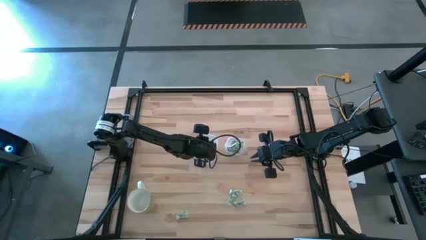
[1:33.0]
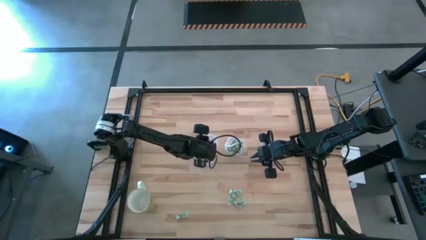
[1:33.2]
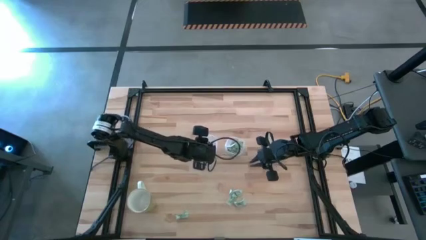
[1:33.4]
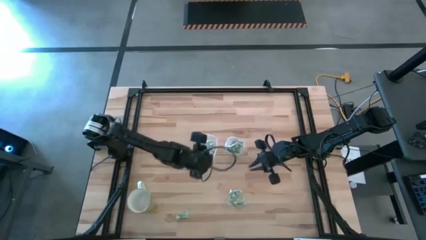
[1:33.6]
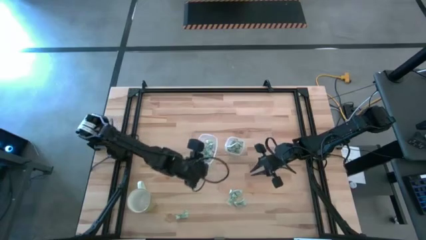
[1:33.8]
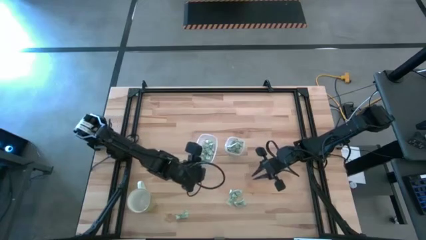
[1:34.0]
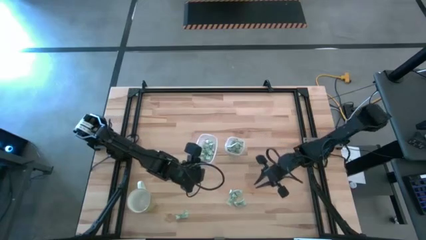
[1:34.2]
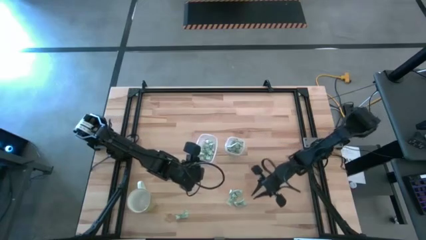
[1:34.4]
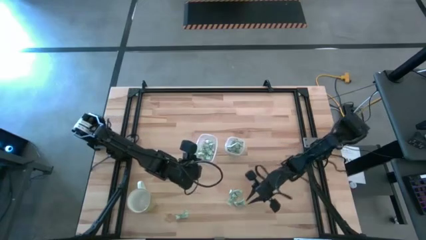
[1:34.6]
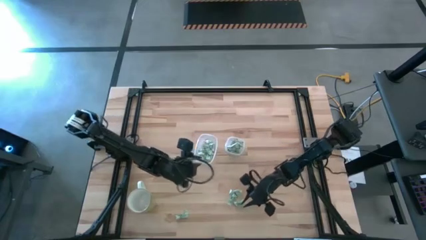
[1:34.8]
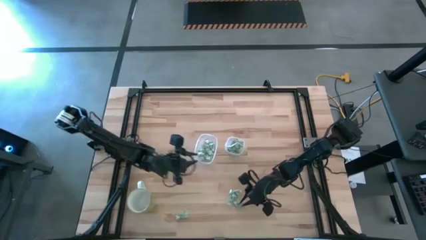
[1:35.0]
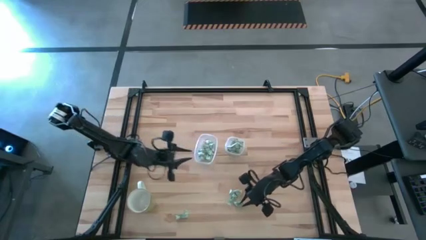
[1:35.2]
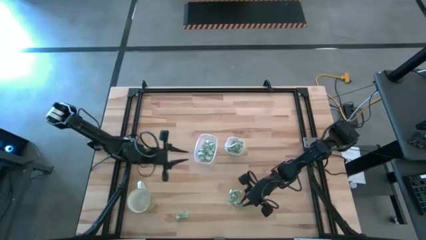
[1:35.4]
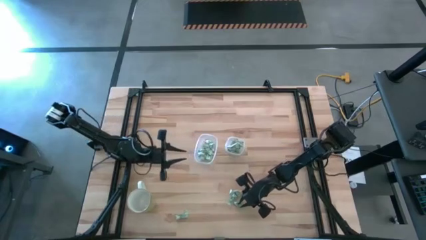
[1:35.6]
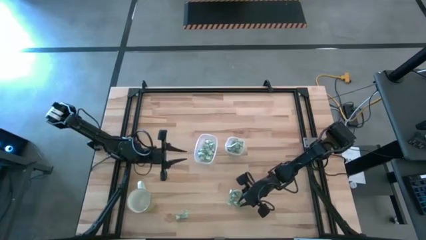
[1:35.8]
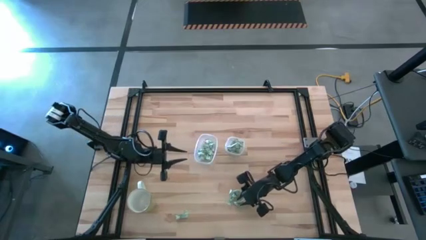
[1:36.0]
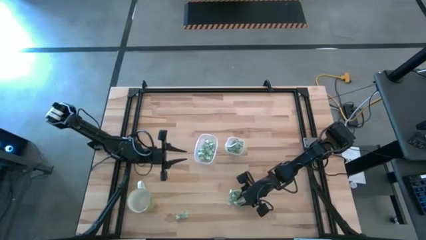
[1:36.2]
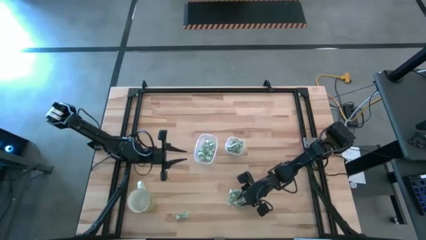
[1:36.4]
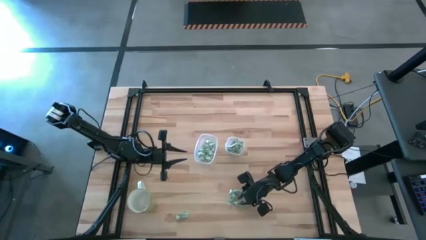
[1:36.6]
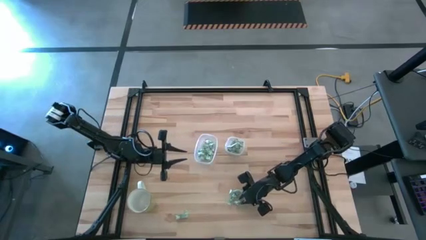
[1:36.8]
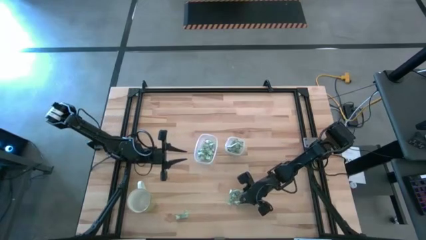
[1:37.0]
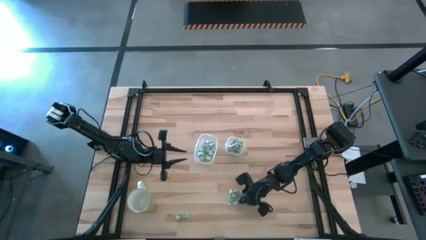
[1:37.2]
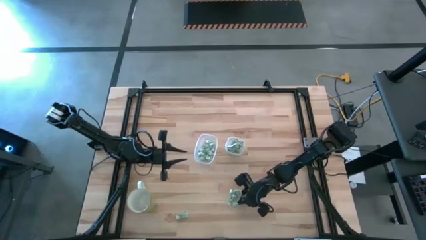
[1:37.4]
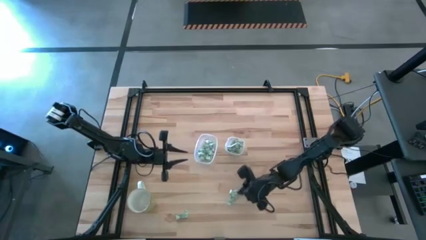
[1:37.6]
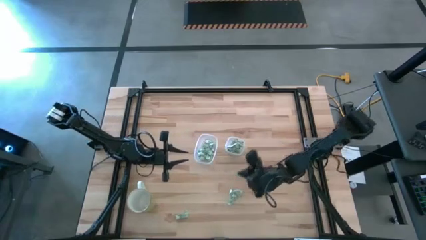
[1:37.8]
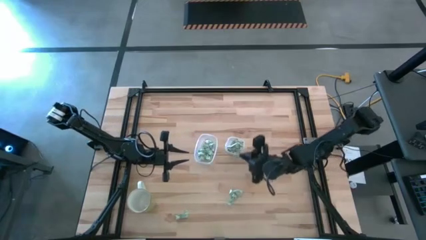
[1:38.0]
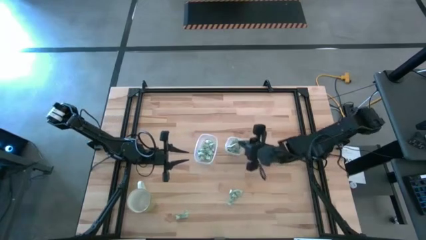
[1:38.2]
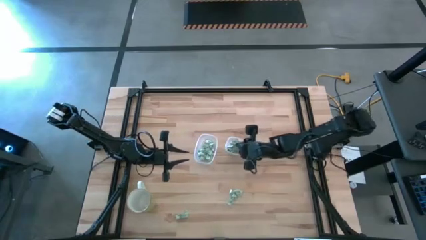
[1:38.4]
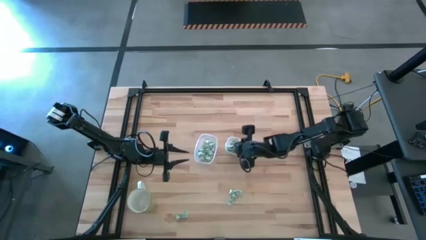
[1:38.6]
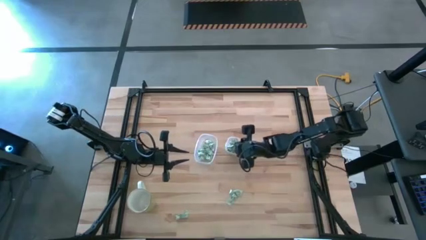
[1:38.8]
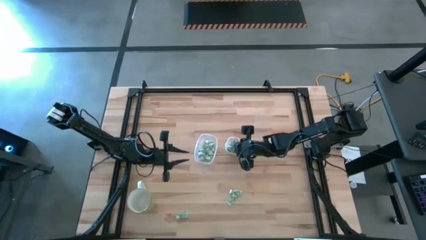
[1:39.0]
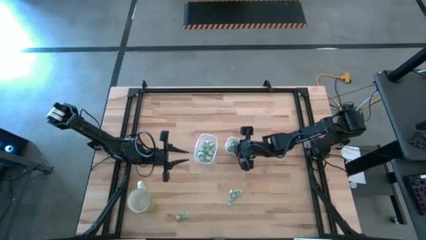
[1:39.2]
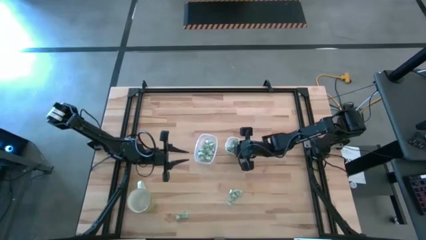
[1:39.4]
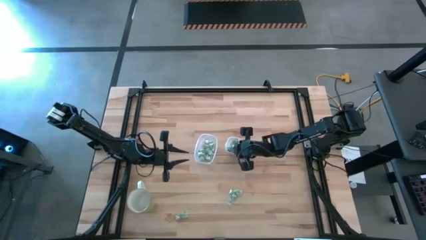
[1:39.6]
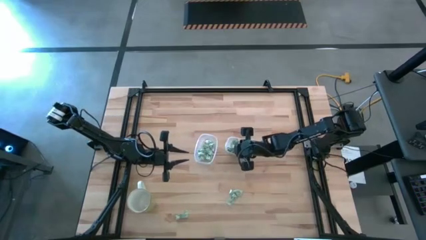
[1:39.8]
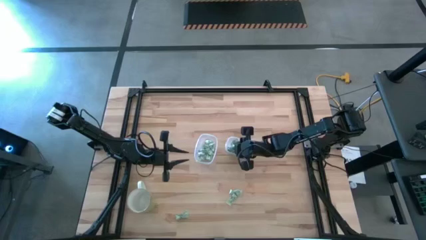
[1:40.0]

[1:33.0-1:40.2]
Task: Pick and place items into bin
Put the white stevia packet into the right transparent bin

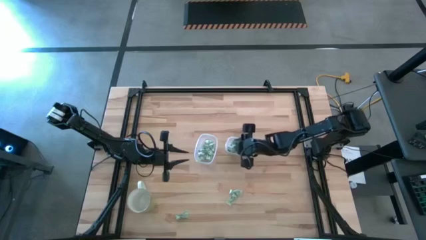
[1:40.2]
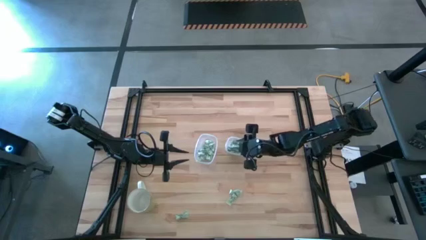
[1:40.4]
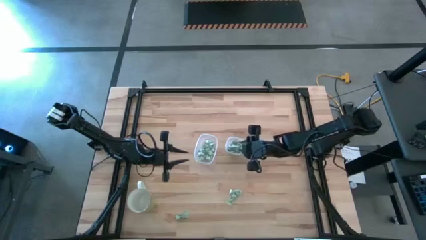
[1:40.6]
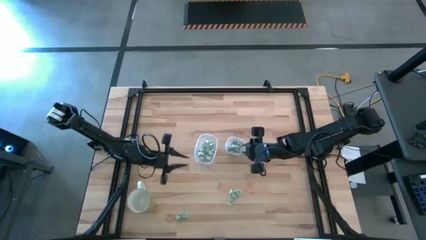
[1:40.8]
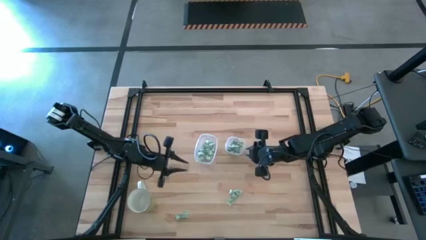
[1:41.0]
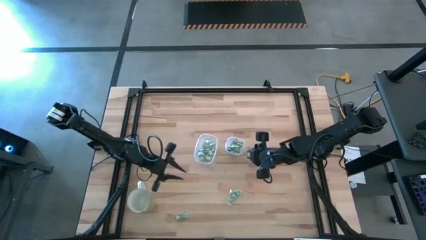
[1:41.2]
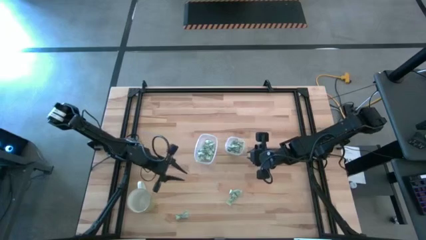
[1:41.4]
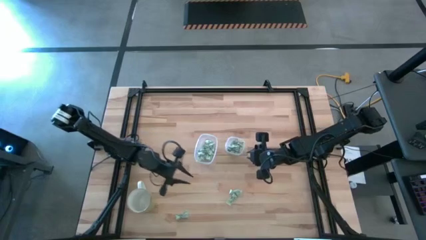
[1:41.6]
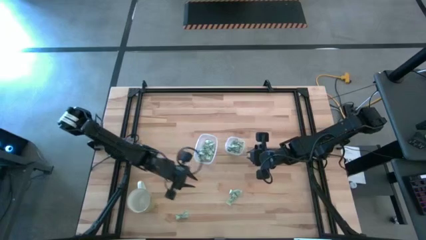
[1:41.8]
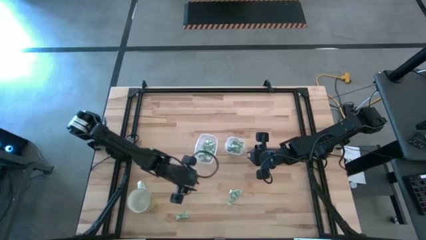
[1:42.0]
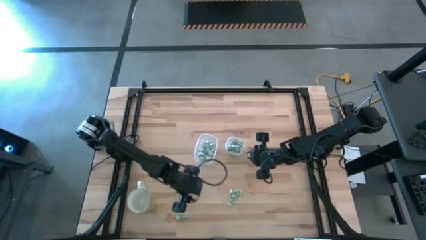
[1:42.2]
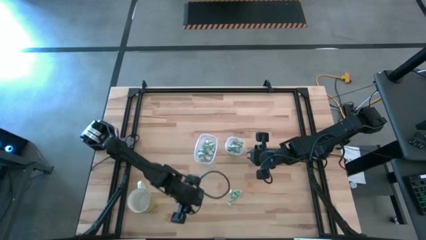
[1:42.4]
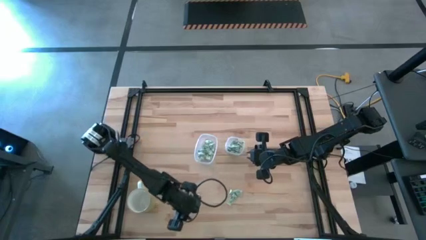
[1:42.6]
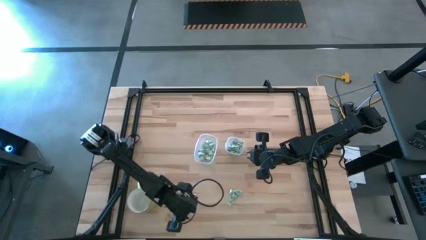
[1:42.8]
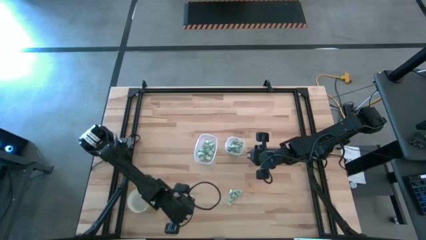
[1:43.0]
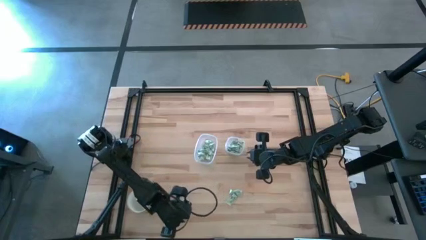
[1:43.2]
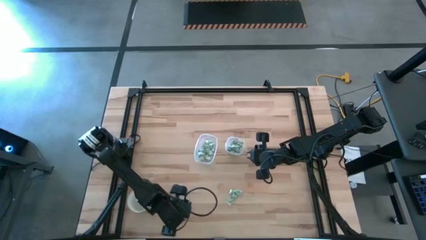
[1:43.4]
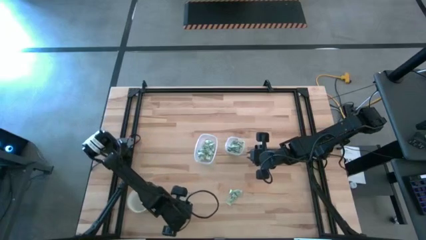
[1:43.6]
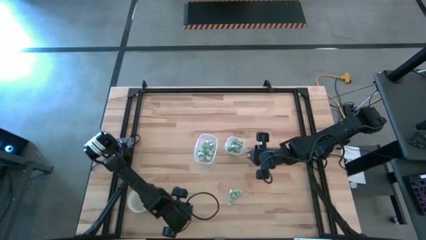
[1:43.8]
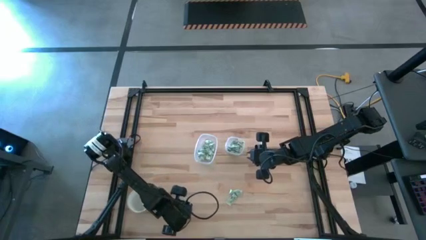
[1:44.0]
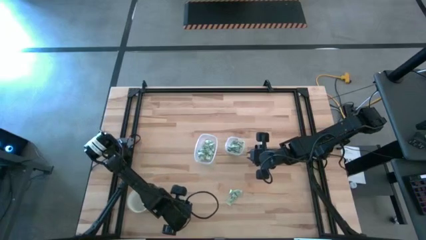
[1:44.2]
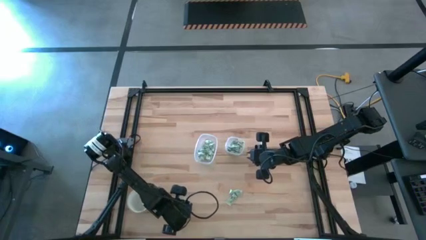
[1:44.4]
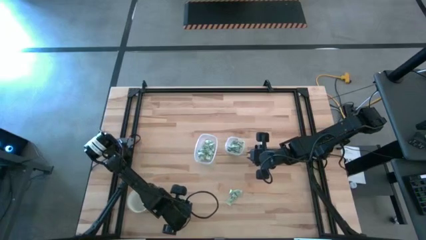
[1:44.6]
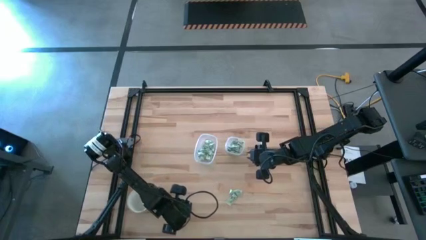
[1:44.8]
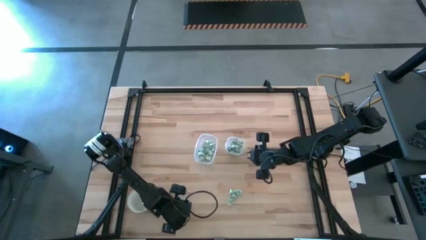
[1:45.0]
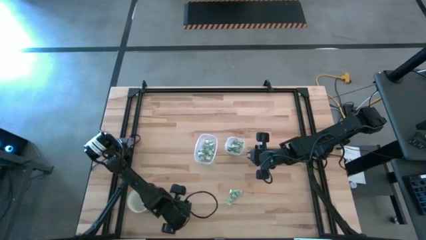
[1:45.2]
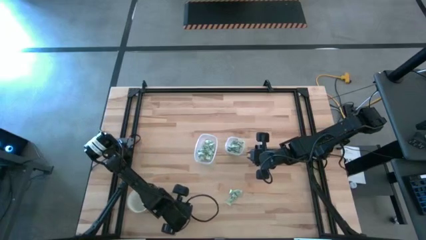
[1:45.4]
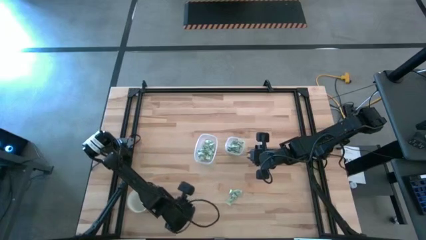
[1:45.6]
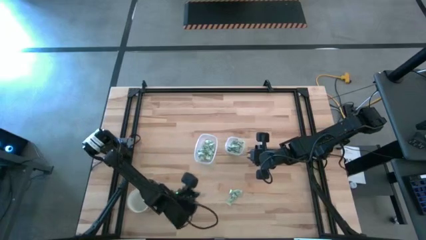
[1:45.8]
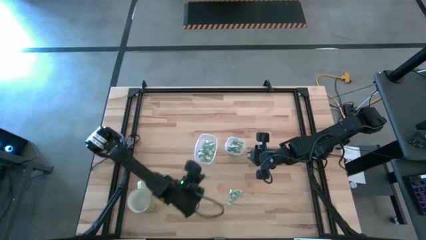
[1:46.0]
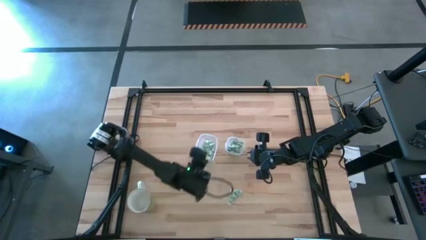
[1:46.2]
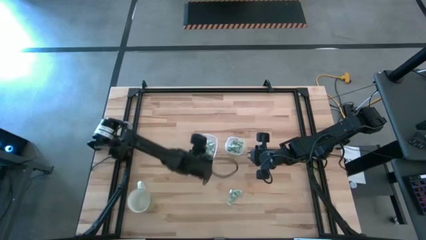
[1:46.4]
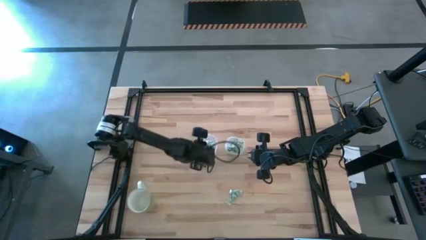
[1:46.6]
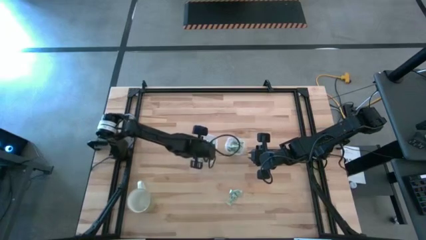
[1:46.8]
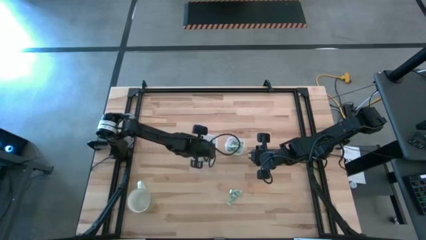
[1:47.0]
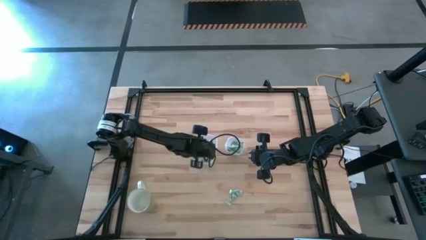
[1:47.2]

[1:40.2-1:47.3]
Put the white stevia packet into the left transparent bin

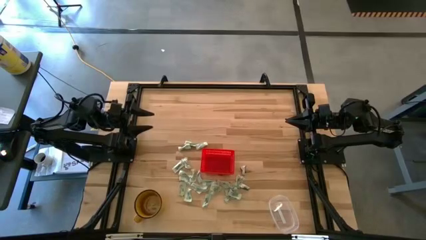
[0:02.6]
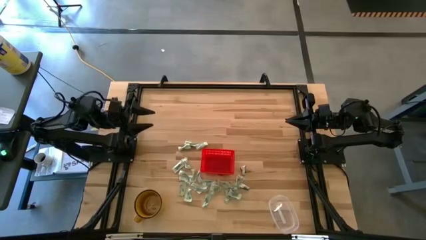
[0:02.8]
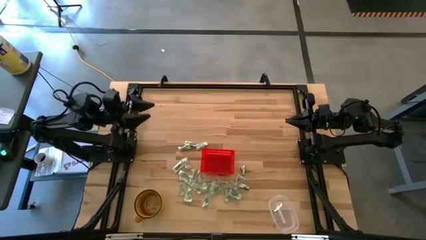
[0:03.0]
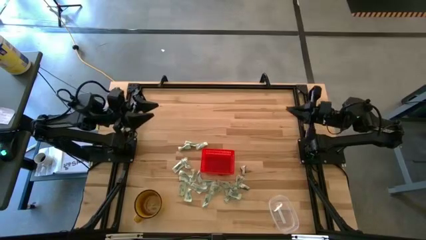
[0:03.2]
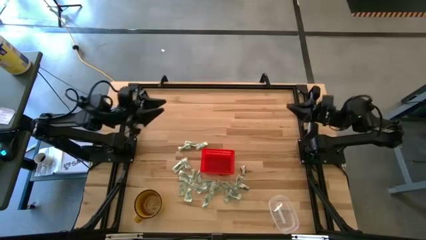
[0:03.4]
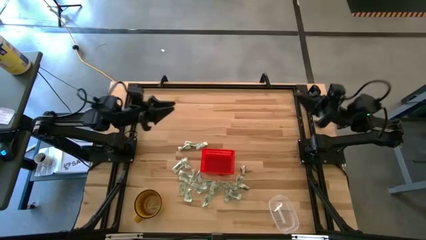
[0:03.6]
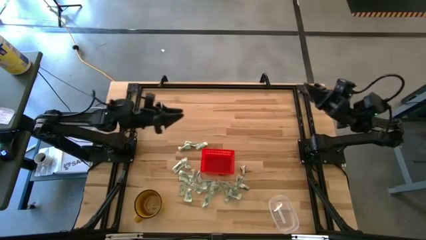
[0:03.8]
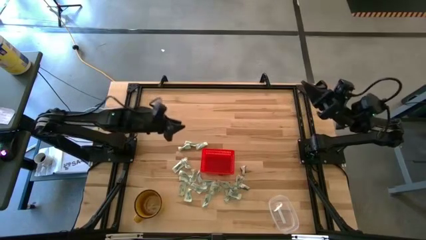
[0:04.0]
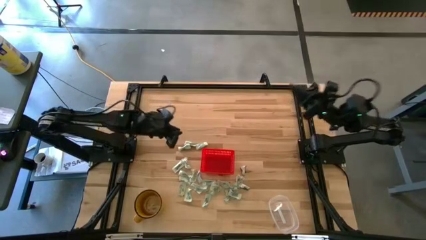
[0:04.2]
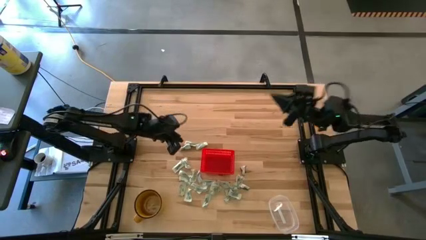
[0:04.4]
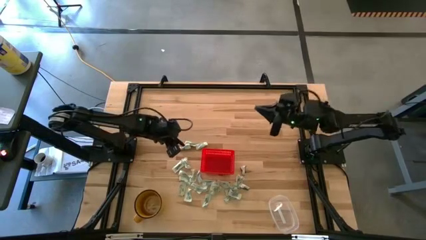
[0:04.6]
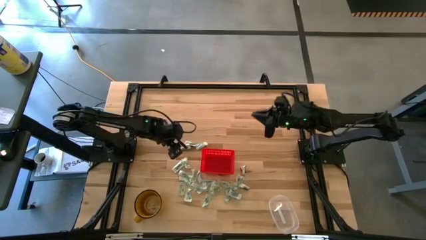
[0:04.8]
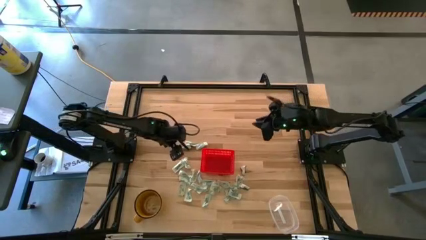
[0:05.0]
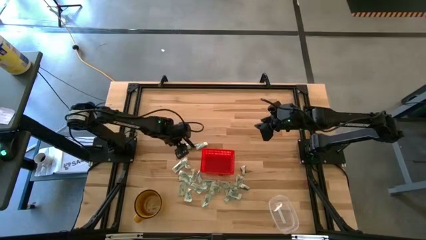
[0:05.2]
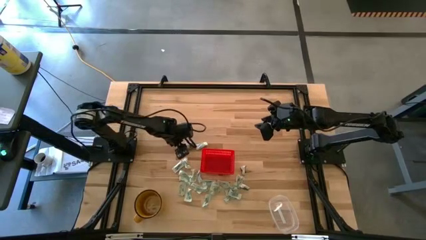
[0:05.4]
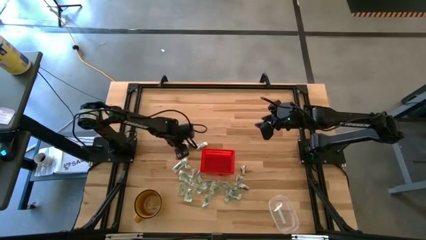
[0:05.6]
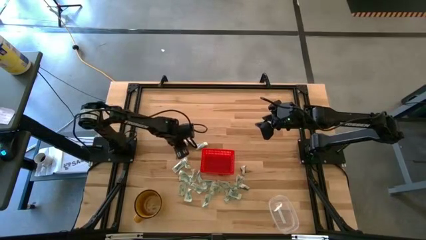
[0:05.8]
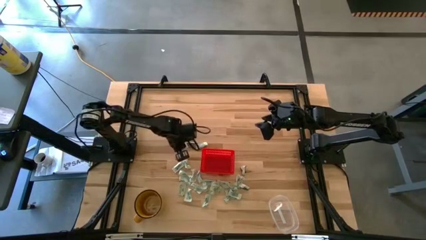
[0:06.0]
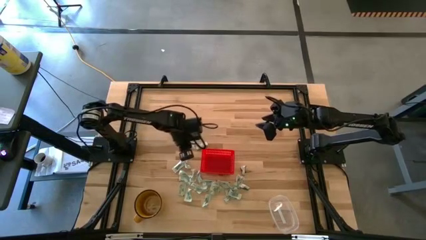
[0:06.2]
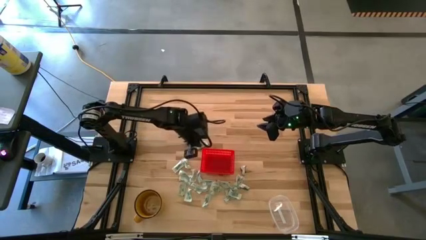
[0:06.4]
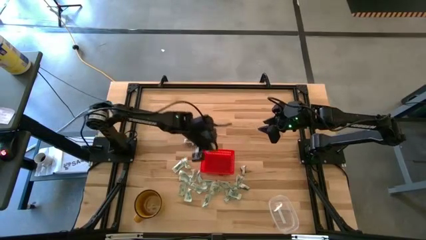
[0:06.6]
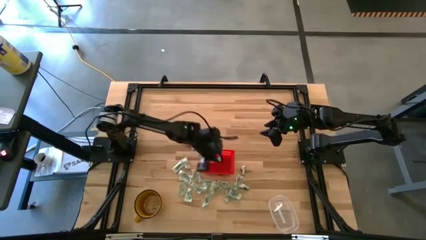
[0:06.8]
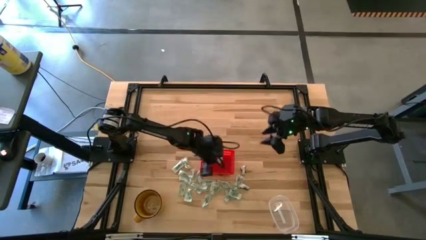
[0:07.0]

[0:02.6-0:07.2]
Task: Pick and place Stevia / Truvia into bins
Put the stevia packet into the orange basket
